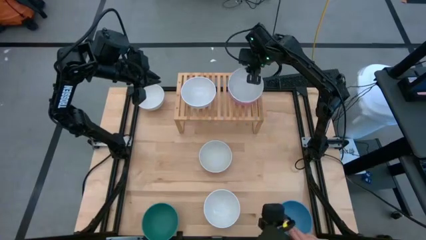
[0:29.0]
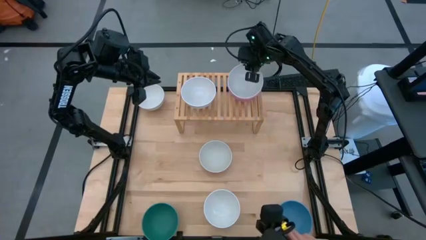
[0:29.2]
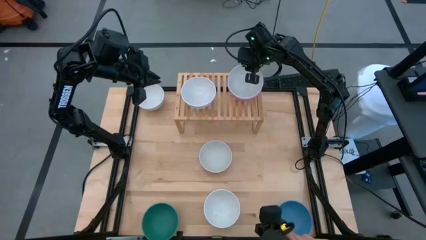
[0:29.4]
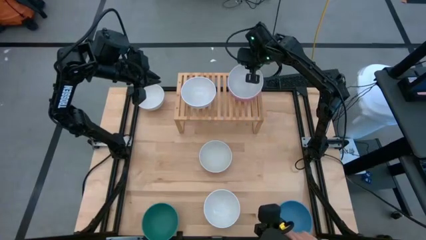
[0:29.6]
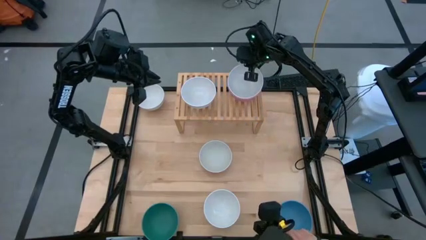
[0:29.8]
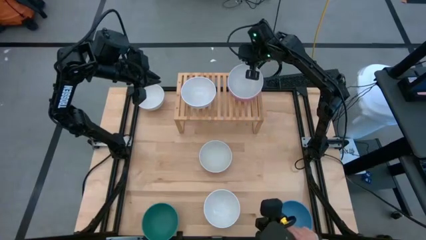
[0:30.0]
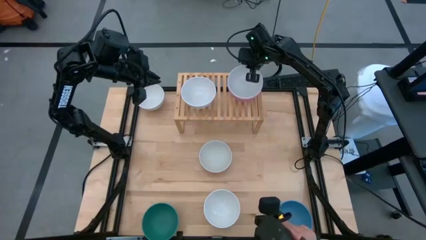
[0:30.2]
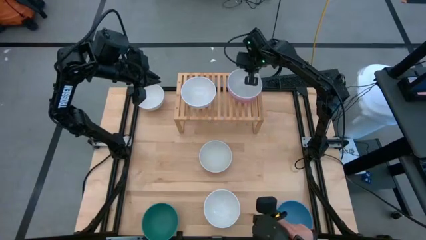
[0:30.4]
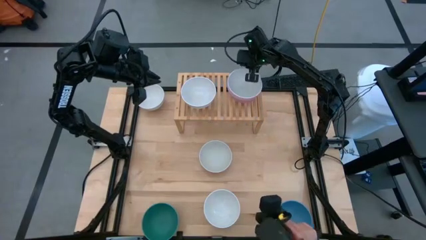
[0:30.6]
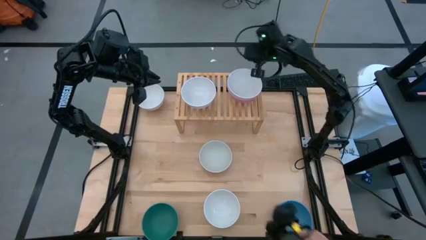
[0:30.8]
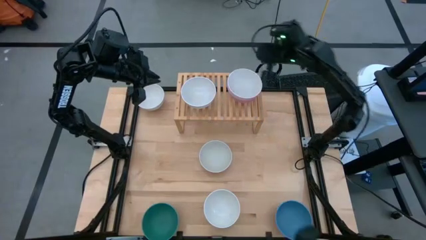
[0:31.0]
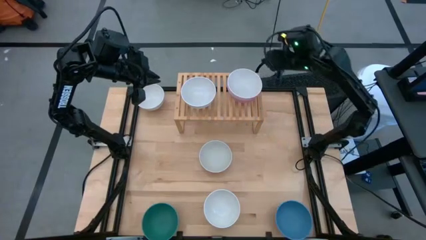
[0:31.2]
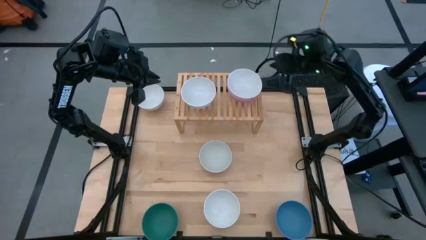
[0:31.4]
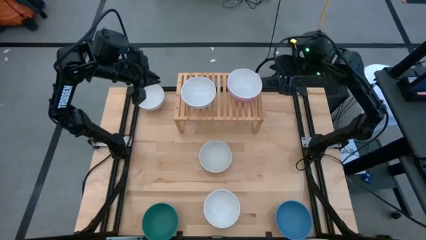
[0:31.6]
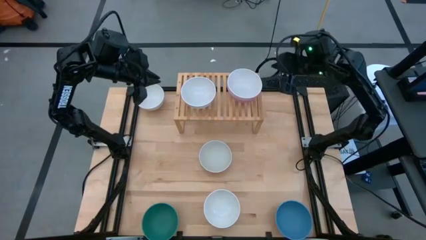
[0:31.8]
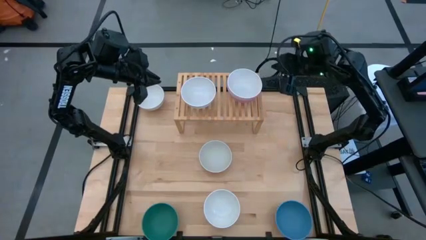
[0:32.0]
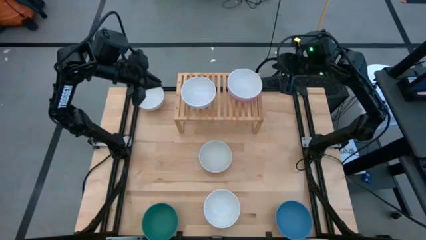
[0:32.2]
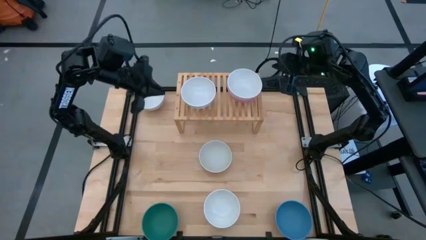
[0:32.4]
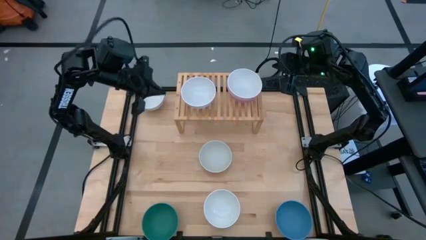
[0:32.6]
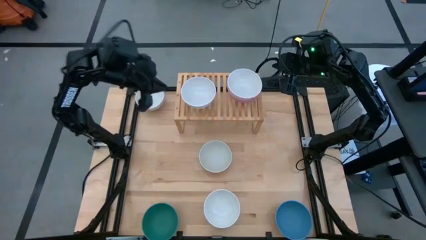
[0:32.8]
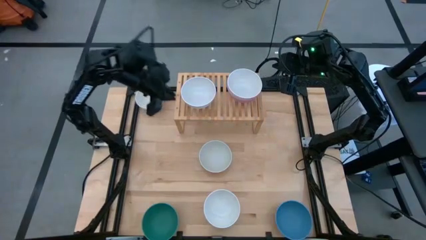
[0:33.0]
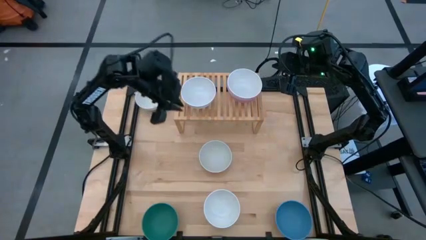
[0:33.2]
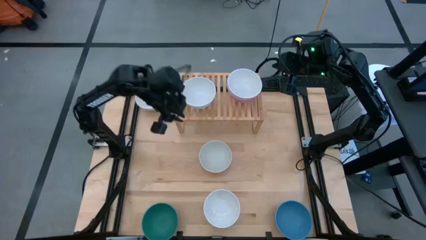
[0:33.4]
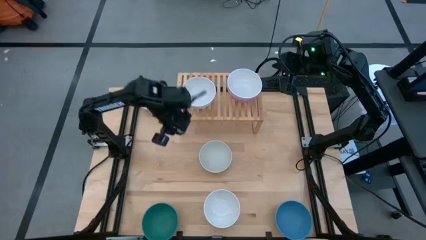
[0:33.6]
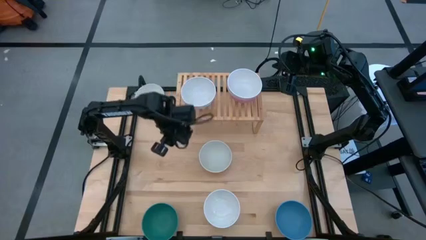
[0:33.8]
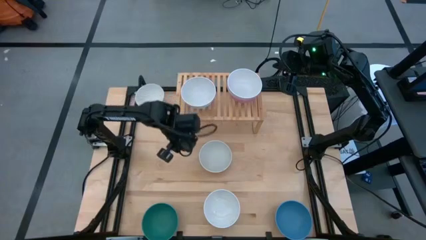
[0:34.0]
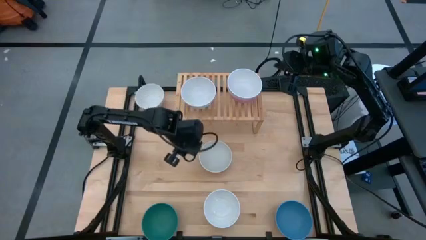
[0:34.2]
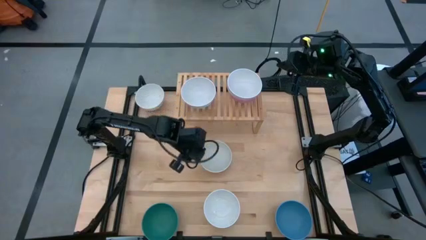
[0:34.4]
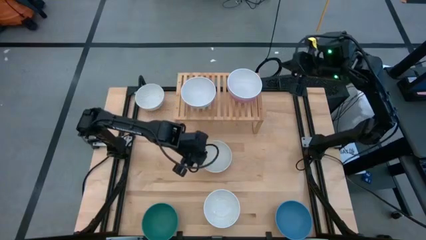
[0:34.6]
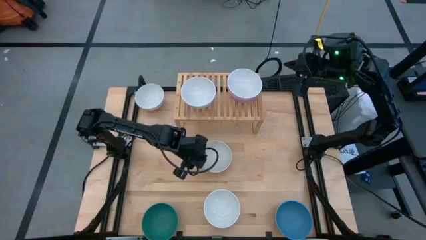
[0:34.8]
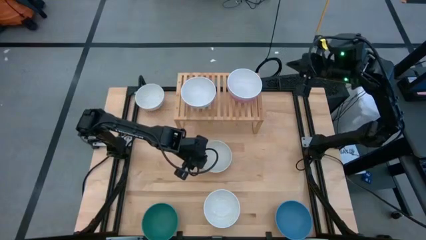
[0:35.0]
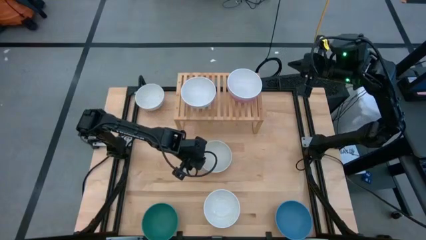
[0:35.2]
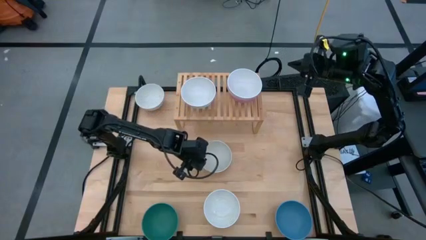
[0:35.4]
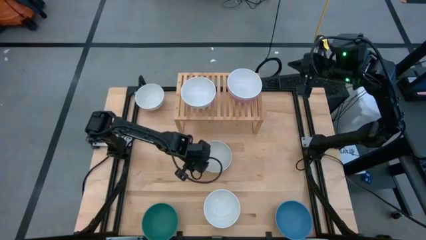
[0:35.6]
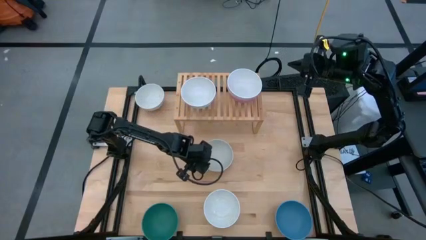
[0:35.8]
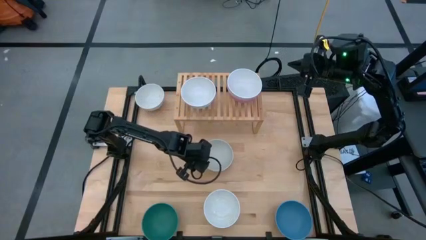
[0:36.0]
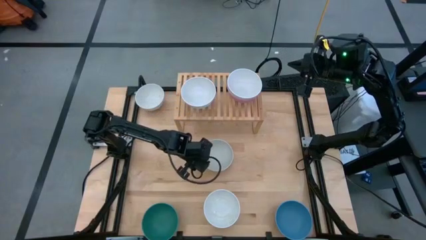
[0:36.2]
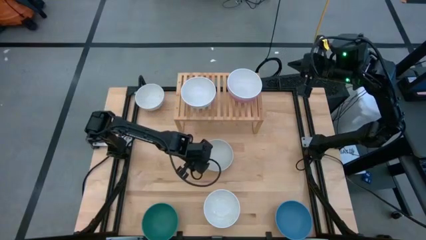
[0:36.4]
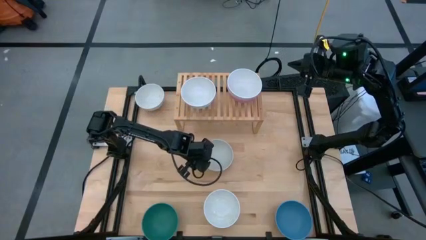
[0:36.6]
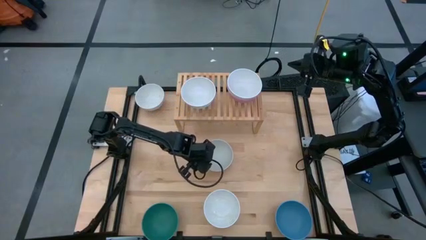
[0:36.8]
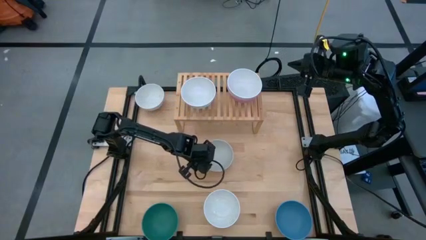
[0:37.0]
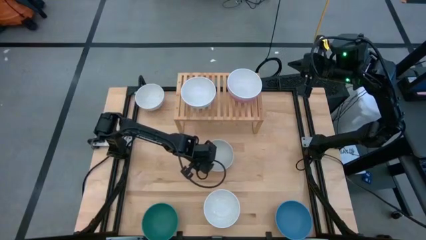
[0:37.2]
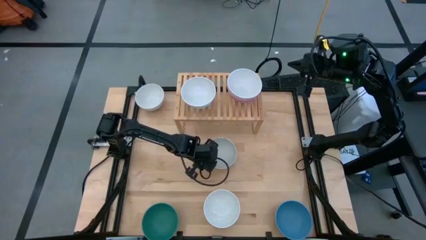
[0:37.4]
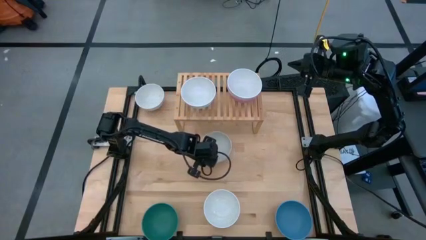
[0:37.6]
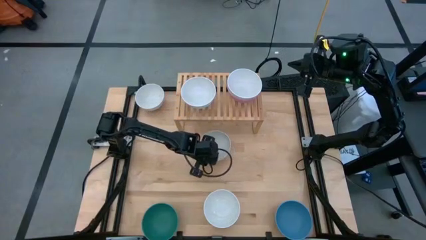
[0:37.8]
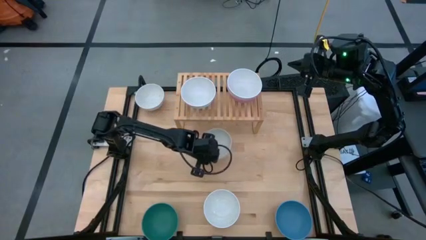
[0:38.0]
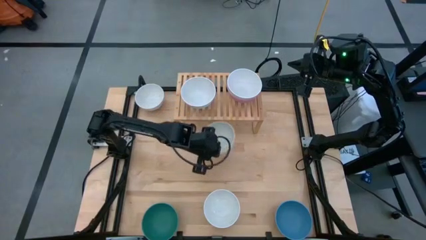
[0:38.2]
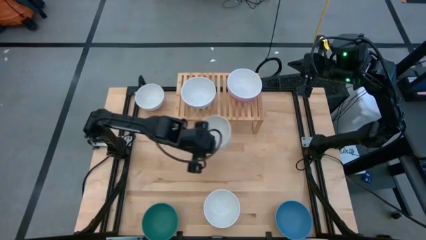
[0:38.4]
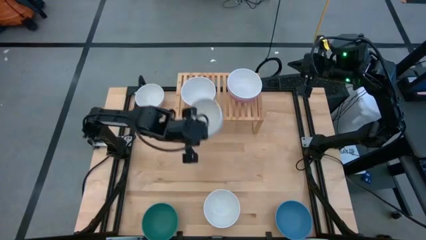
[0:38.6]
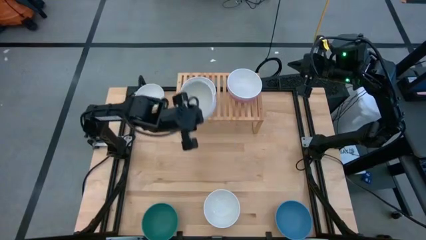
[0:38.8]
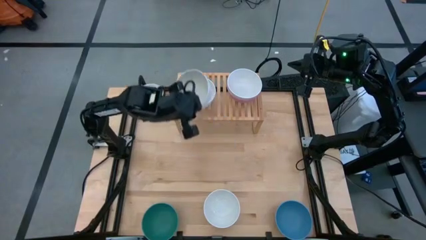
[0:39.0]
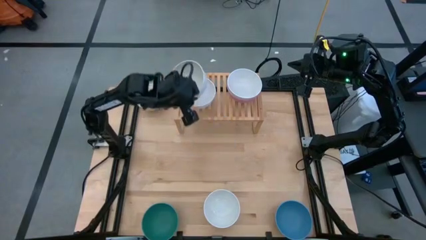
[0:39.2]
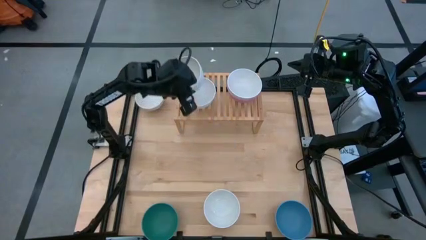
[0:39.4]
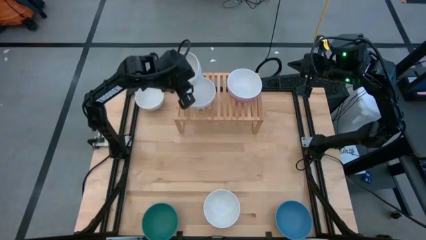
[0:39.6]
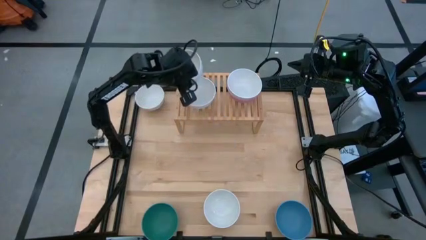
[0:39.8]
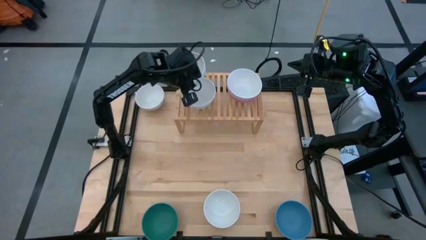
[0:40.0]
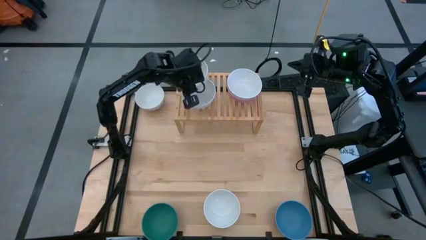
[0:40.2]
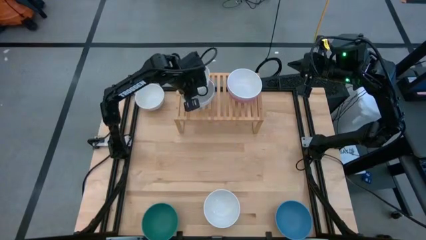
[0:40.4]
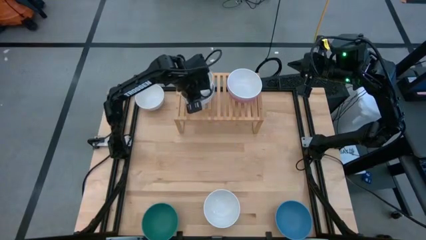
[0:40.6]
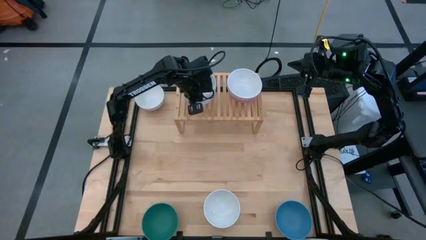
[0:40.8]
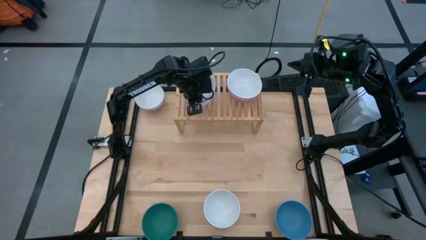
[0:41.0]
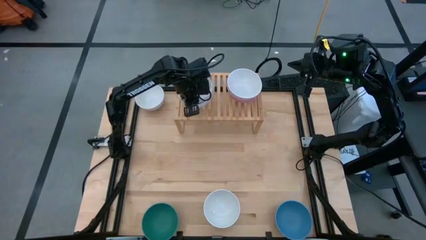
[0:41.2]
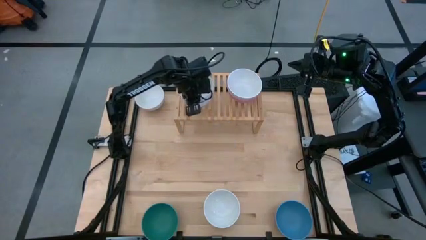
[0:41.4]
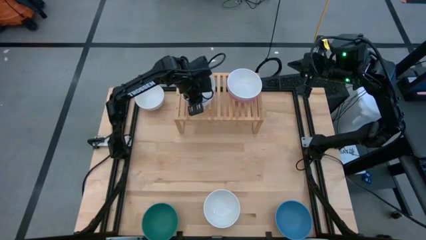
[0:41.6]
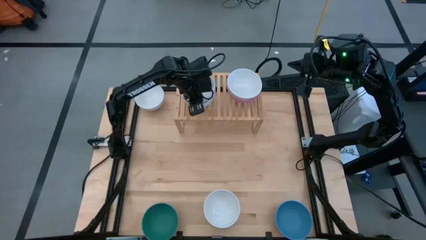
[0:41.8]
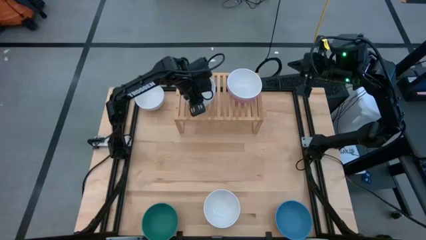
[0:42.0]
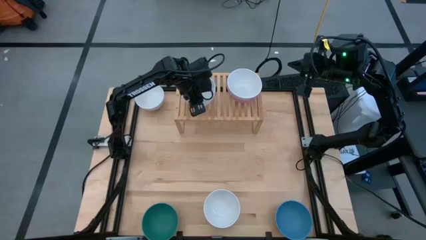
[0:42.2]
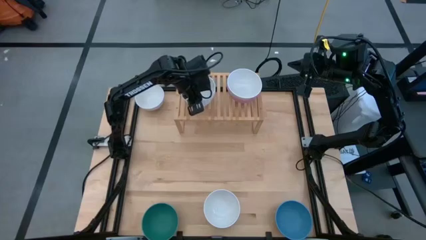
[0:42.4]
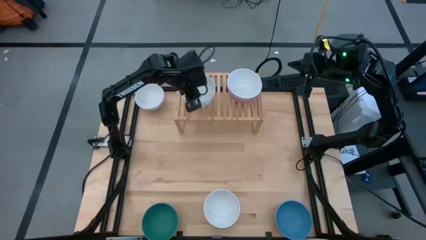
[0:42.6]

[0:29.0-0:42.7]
Task: Place and stack bowls onto a shelf
Stack the gray bowl on top of the white bowl on the shelf
